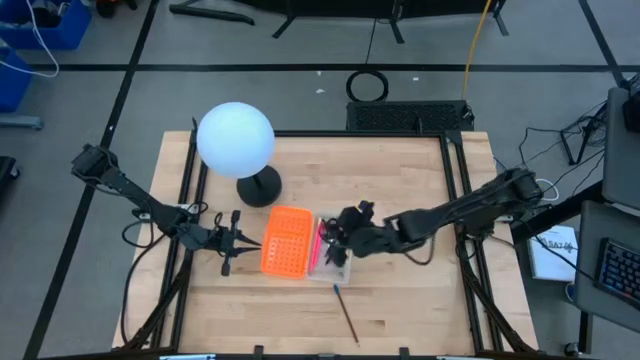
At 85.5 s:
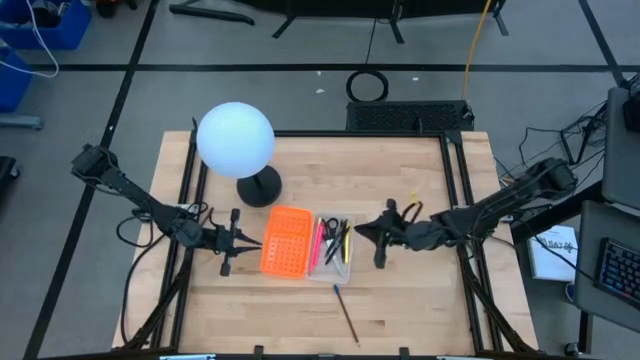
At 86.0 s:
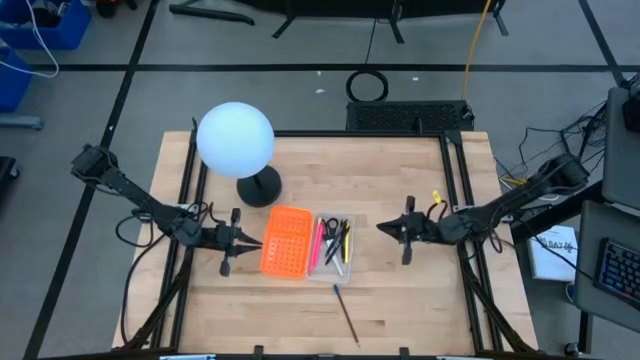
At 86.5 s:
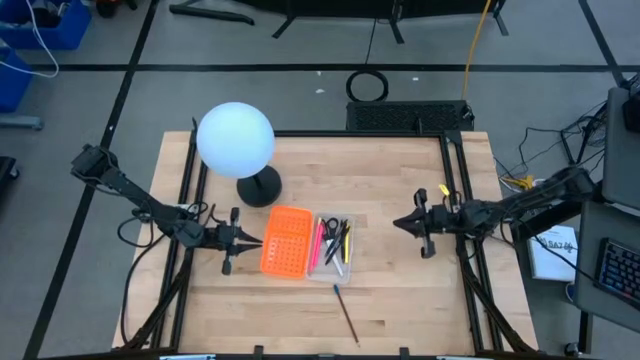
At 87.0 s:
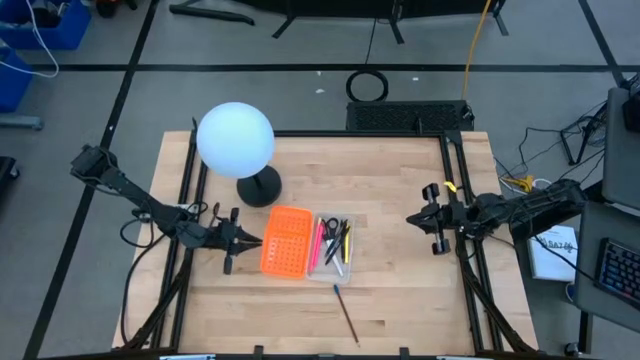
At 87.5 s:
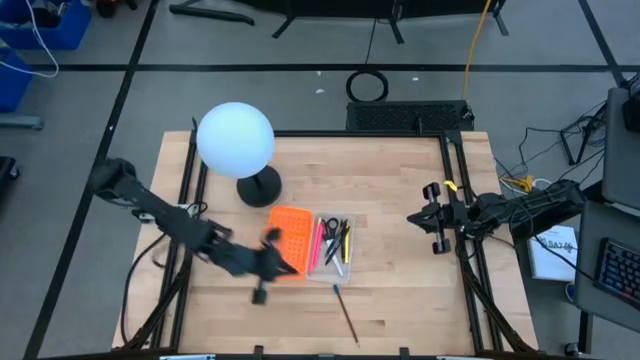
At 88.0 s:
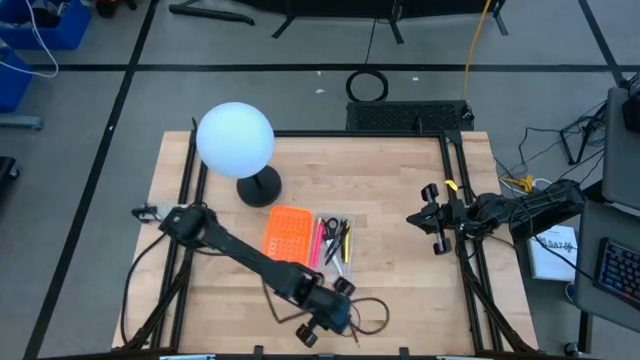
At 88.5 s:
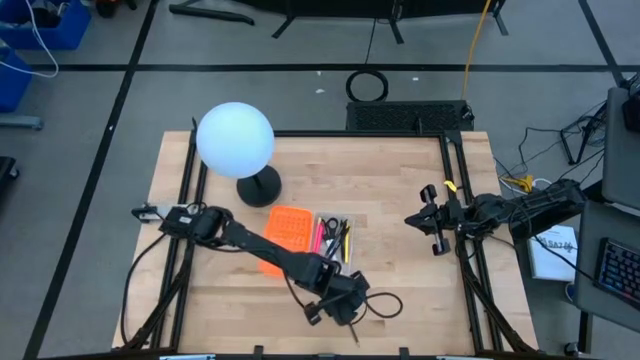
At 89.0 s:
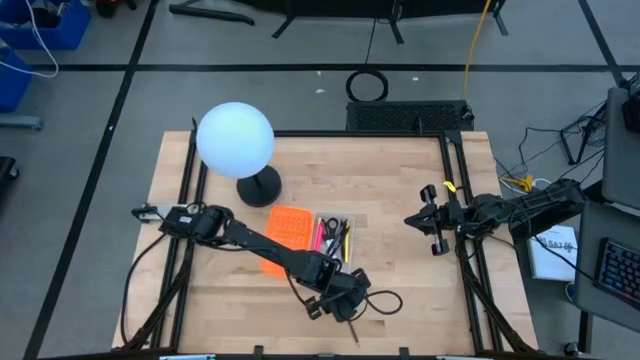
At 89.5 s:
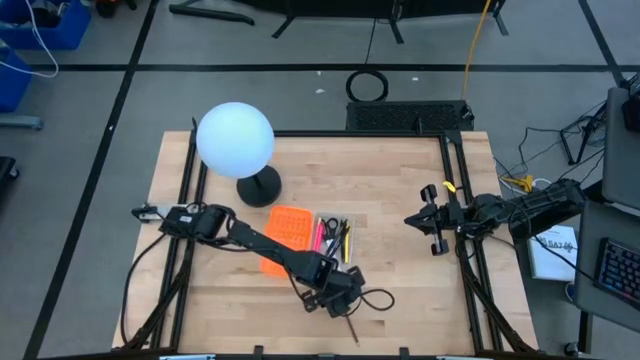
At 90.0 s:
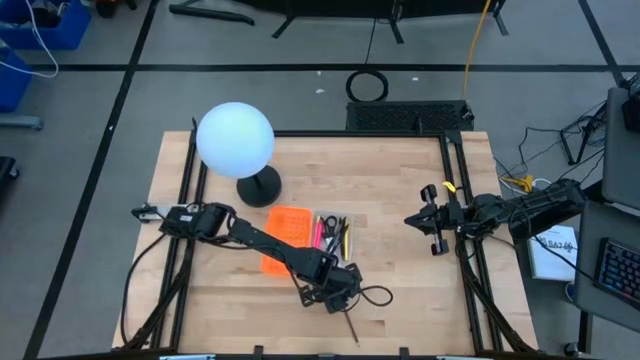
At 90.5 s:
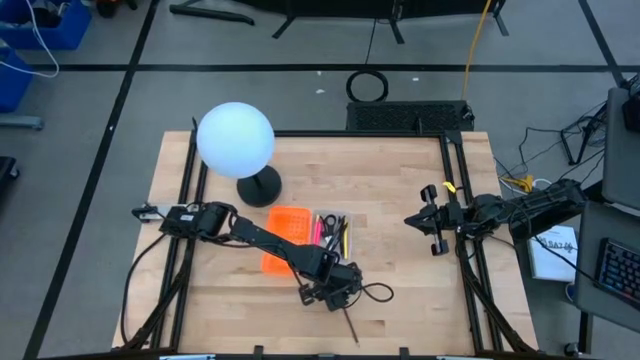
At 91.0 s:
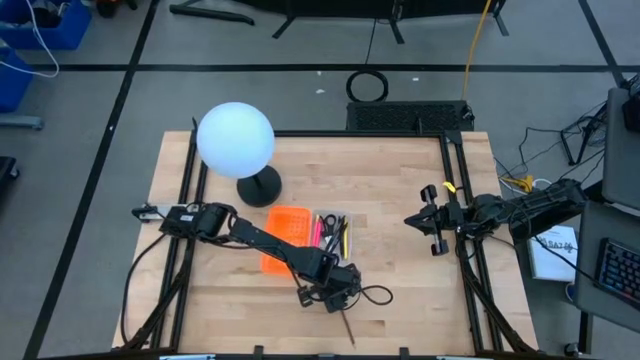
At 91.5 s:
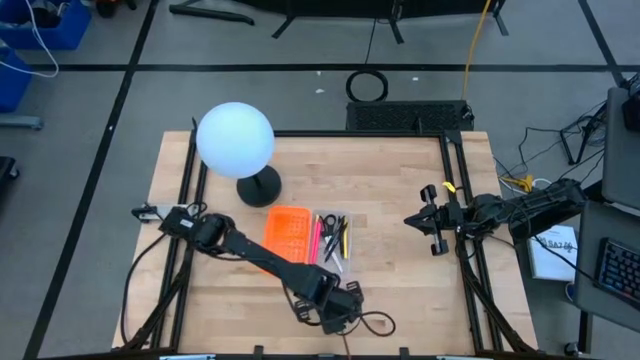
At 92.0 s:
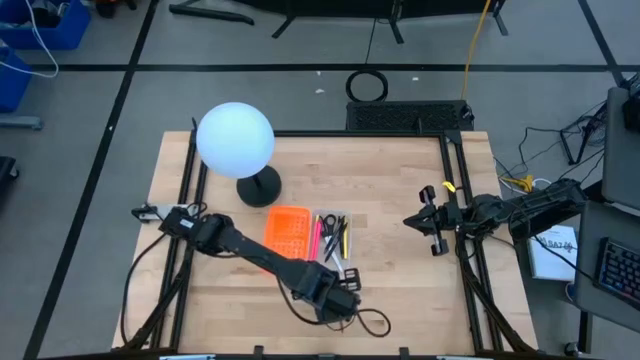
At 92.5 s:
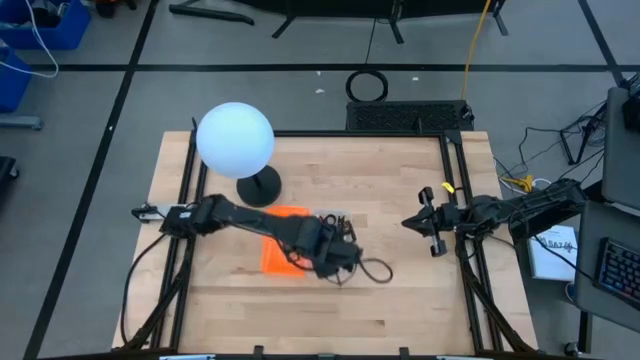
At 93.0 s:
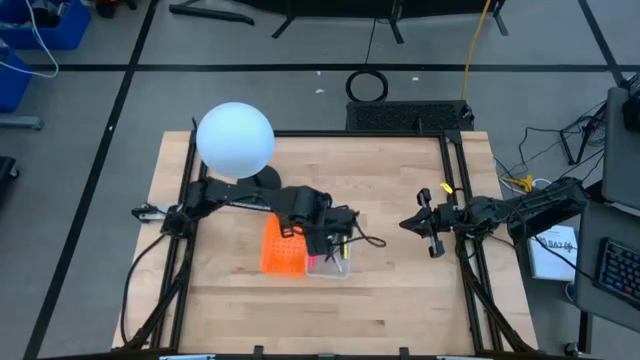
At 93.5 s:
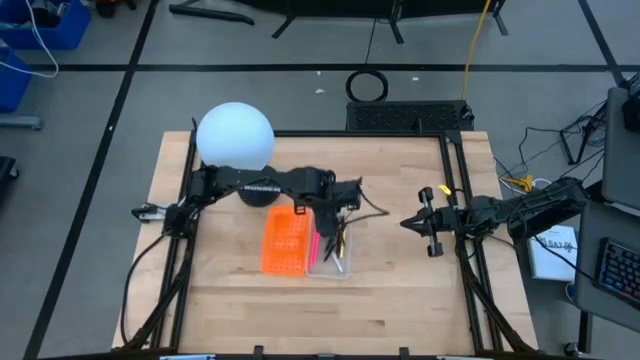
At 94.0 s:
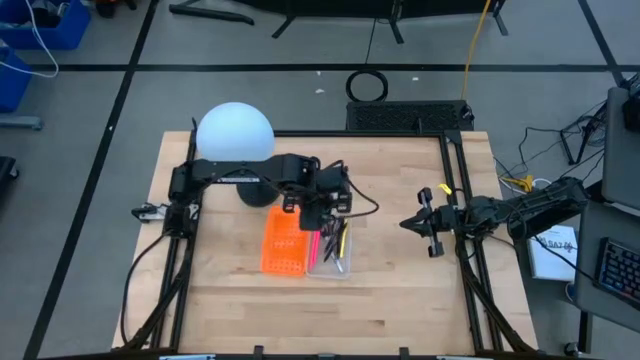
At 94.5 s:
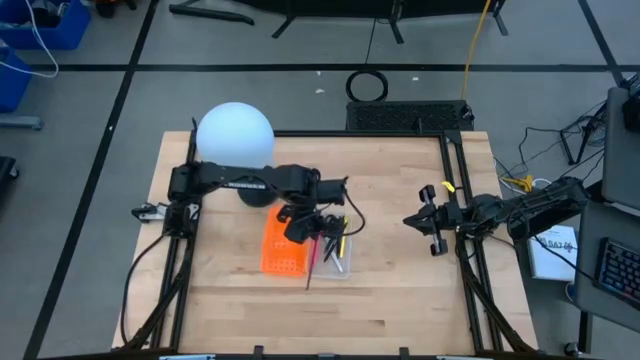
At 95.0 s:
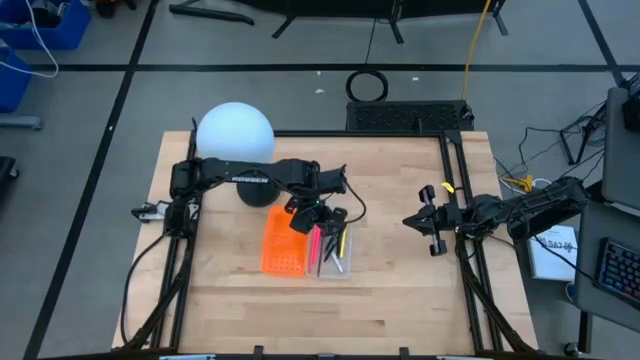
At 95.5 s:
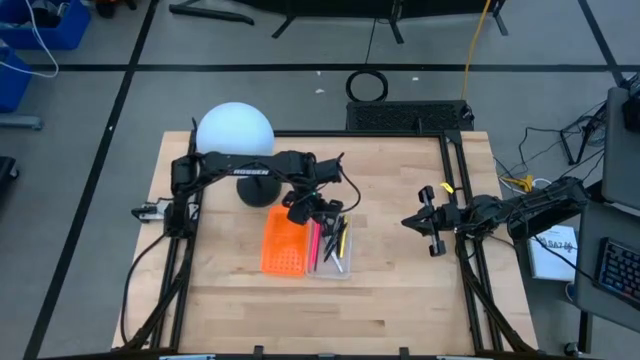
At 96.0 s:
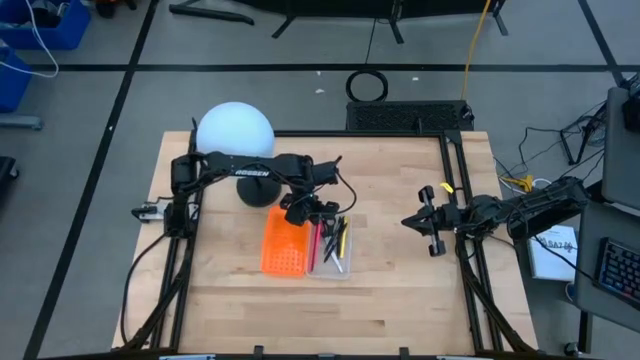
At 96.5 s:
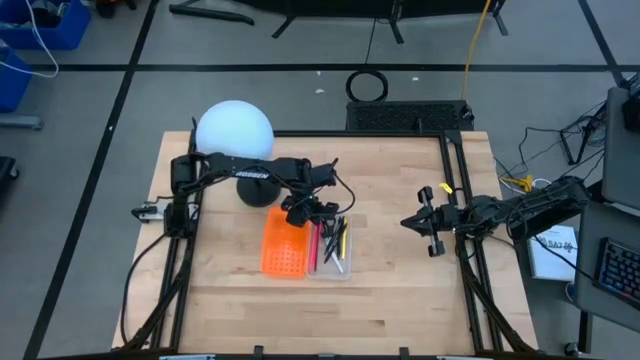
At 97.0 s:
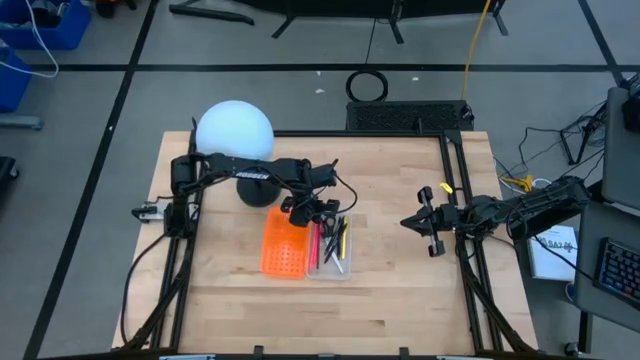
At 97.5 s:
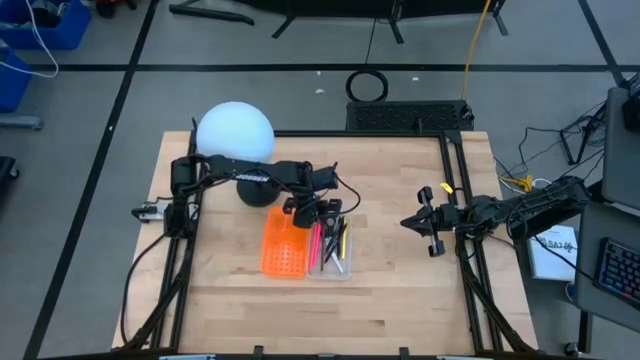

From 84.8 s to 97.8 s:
Task: Pick & place school supplies into a supply box
Put the red pencil into the transparent bin

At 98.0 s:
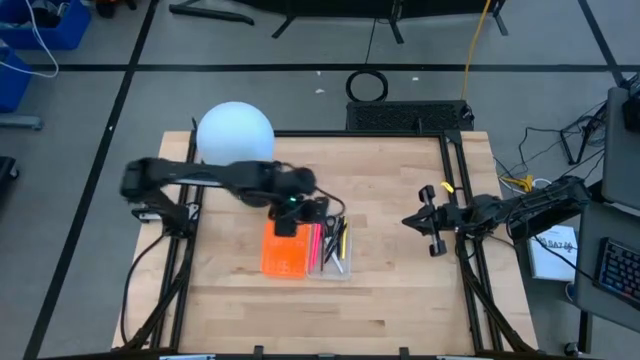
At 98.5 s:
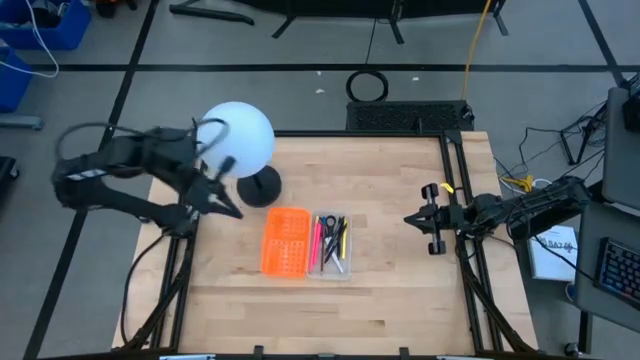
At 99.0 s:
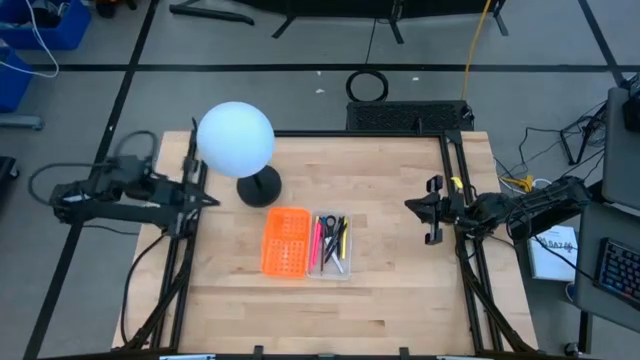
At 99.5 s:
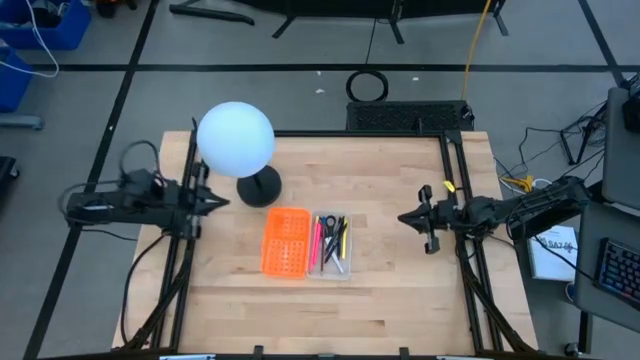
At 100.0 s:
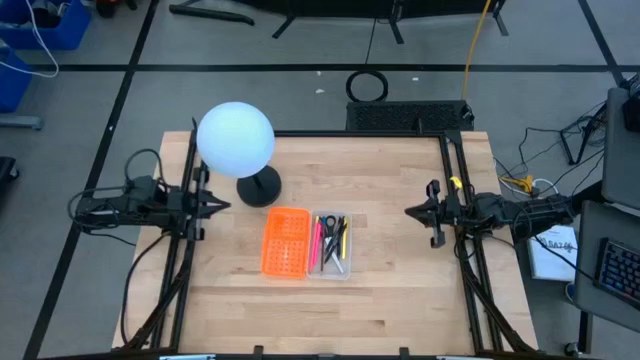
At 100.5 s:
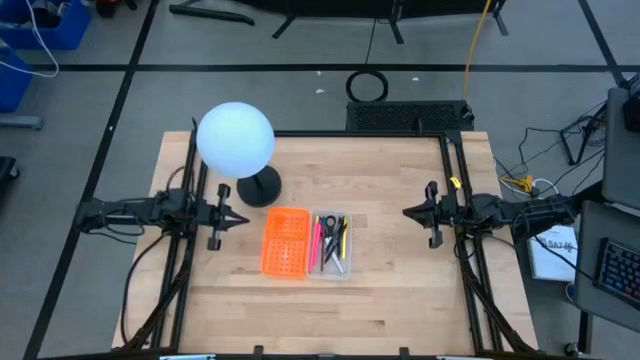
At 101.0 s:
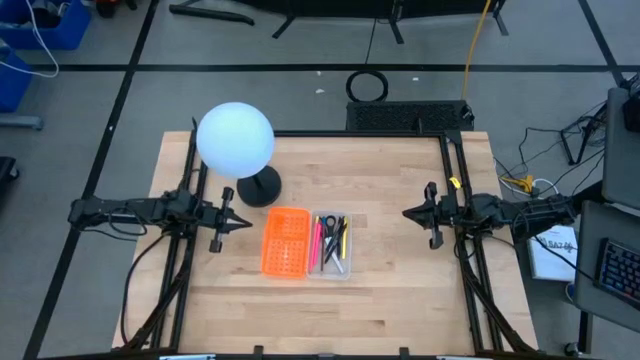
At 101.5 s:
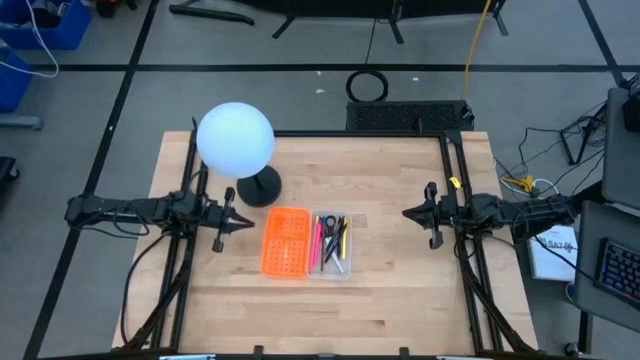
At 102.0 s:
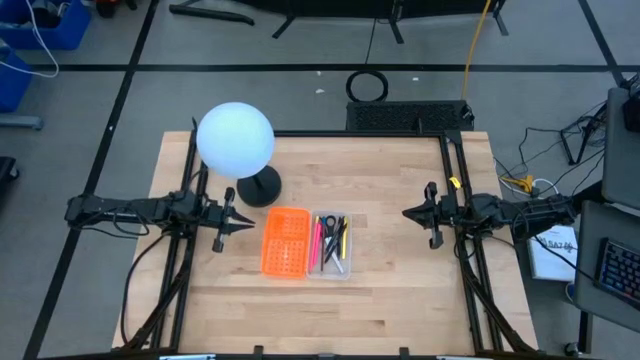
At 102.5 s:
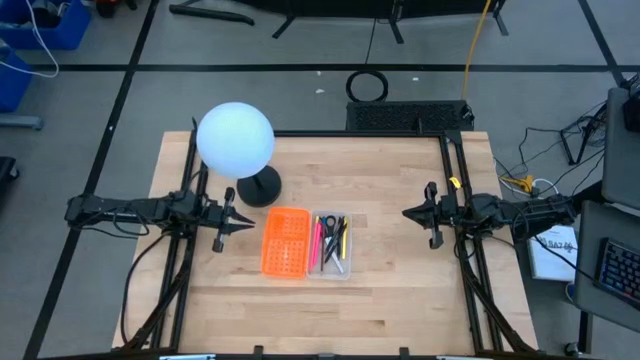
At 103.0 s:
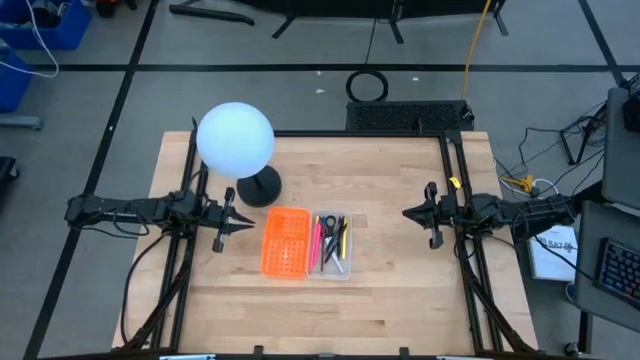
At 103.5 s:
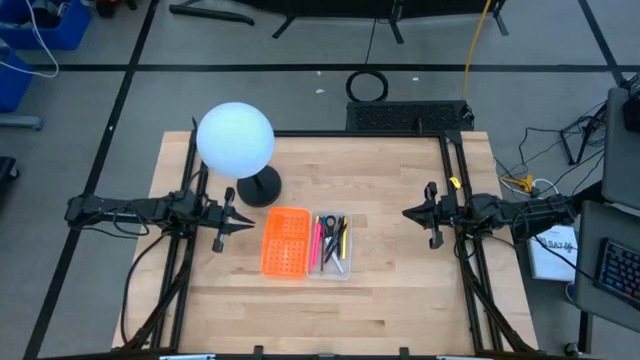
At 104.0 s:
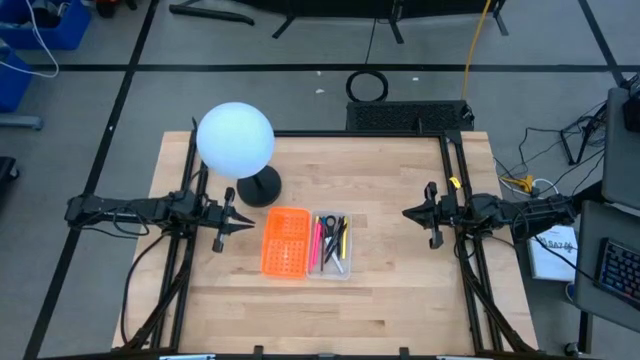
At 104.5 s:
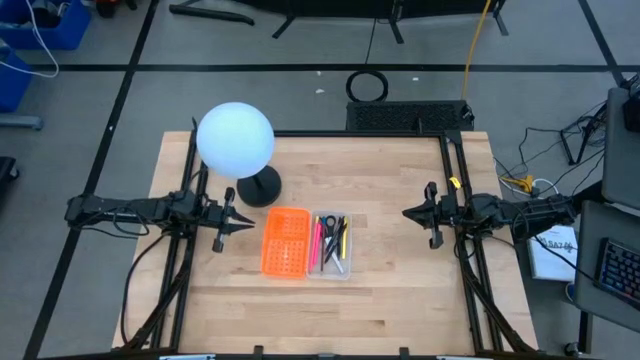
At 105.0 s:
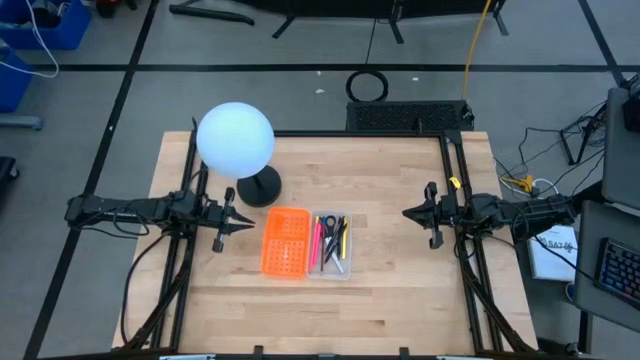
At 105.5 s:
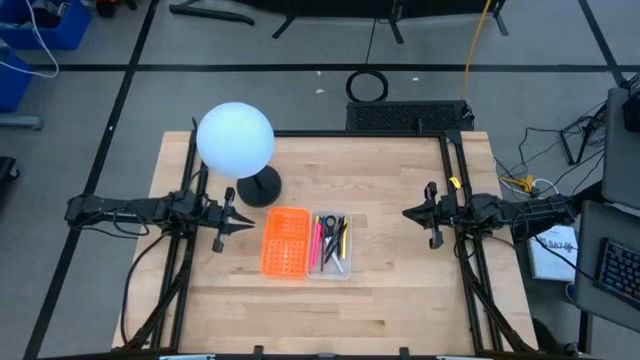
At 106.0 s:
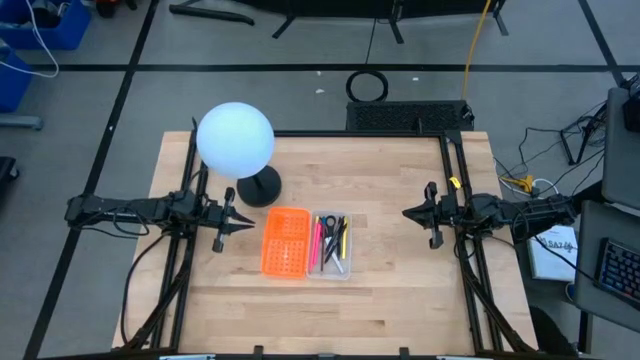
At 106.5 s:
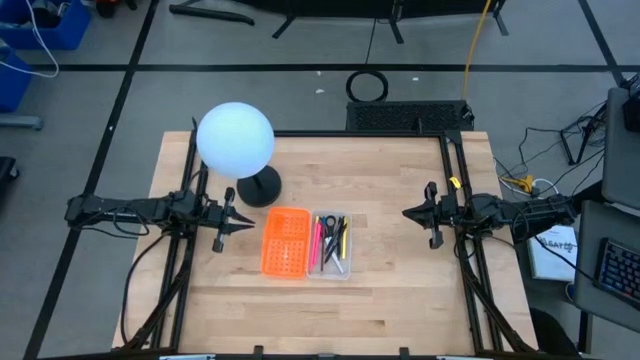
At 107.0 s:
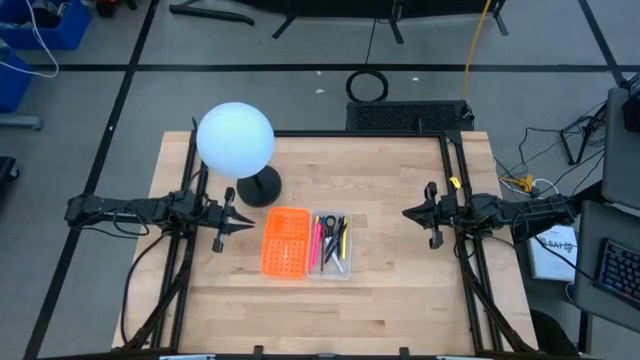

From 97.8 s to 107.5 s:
Return to Home Position
